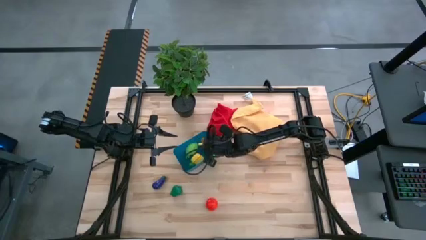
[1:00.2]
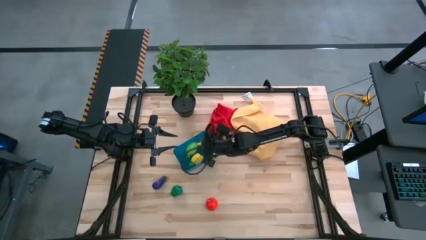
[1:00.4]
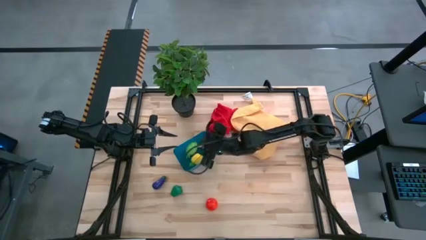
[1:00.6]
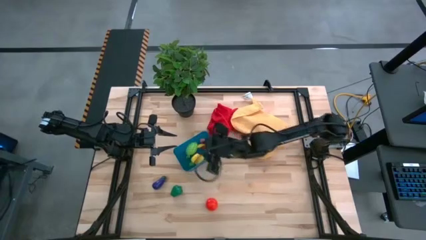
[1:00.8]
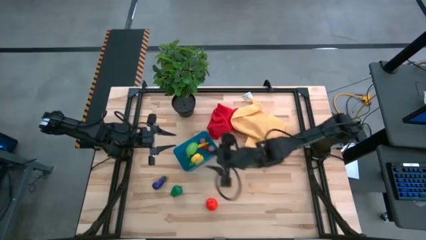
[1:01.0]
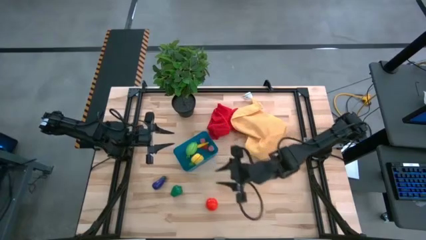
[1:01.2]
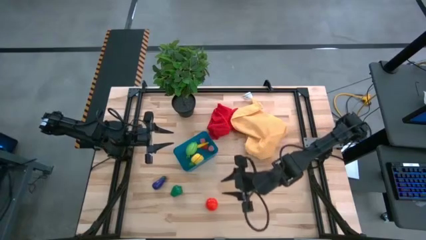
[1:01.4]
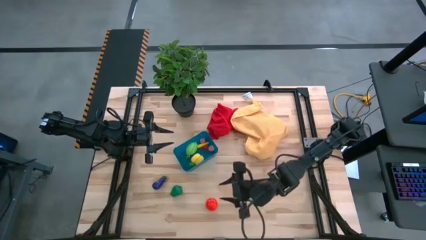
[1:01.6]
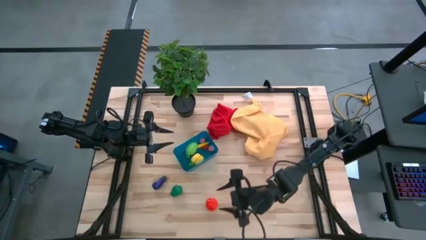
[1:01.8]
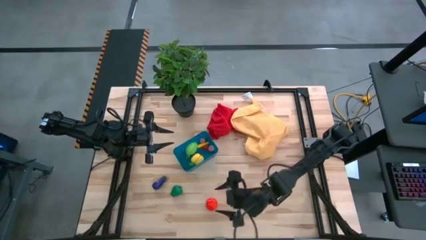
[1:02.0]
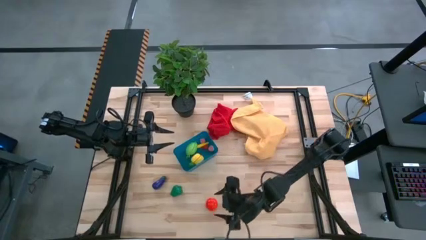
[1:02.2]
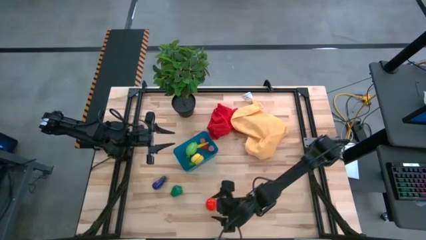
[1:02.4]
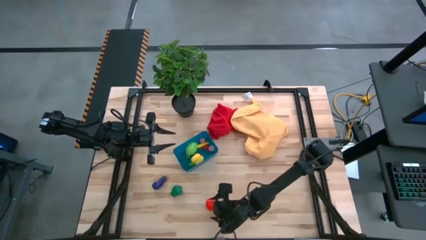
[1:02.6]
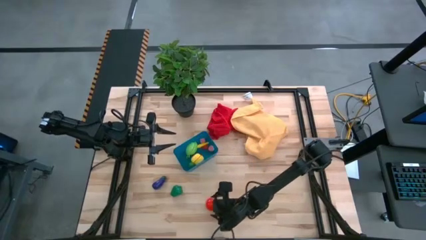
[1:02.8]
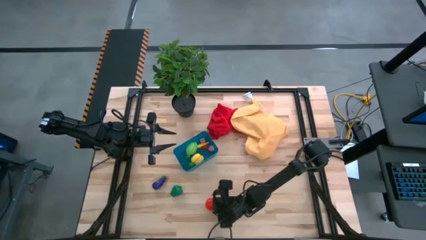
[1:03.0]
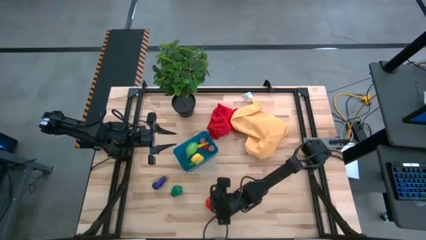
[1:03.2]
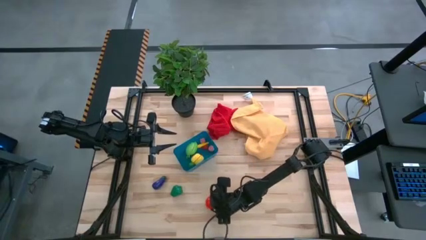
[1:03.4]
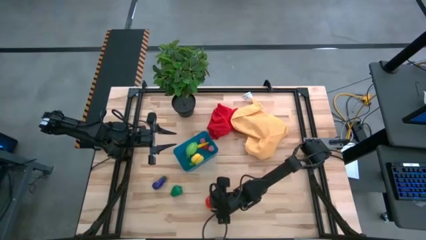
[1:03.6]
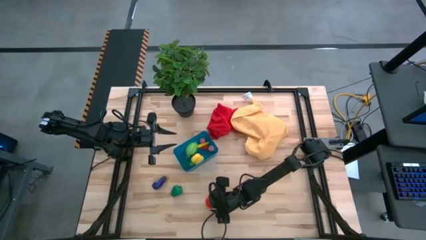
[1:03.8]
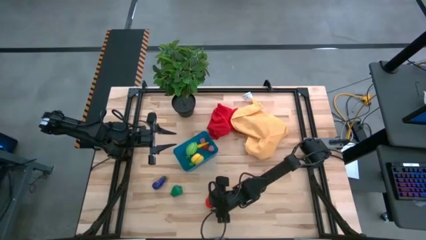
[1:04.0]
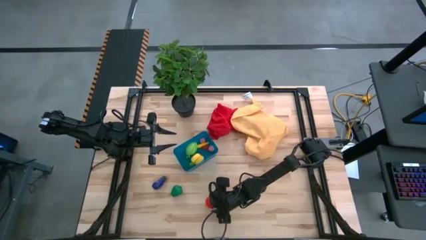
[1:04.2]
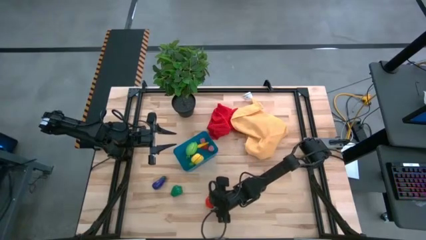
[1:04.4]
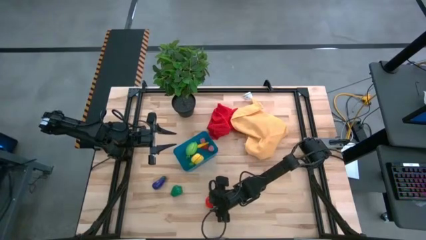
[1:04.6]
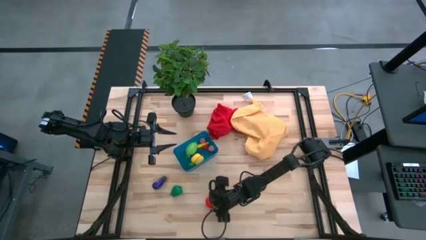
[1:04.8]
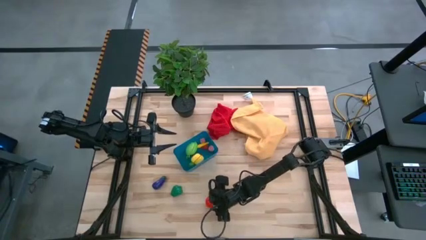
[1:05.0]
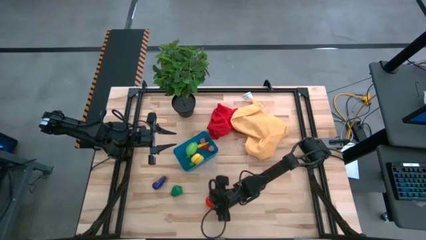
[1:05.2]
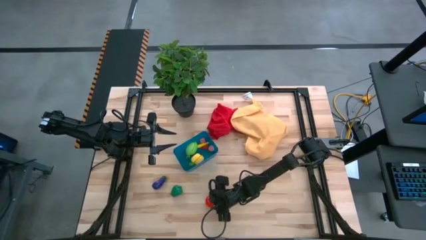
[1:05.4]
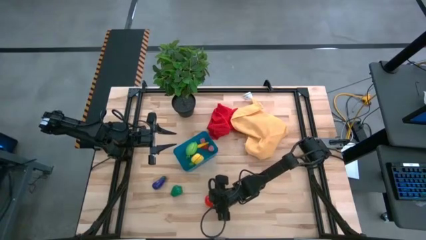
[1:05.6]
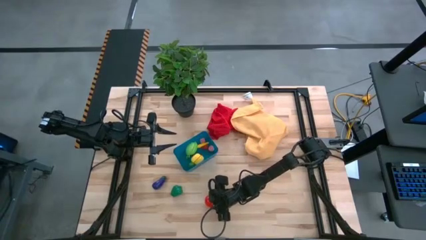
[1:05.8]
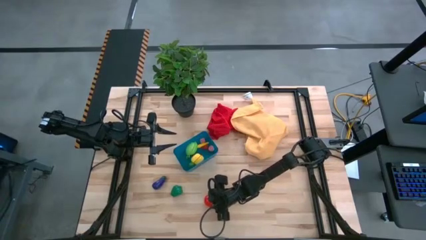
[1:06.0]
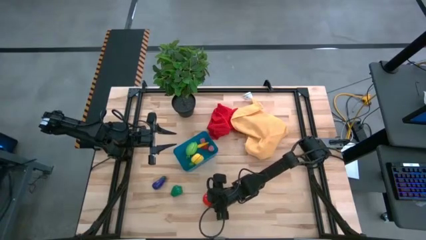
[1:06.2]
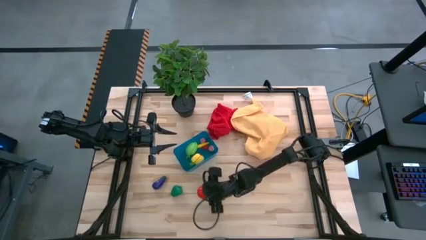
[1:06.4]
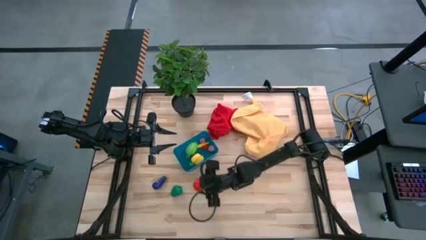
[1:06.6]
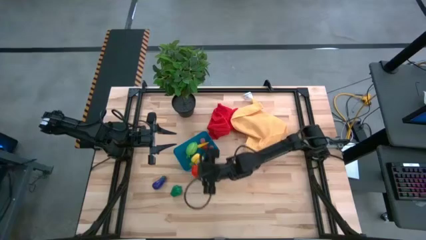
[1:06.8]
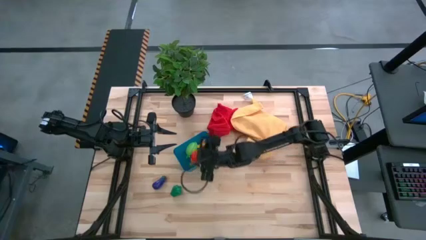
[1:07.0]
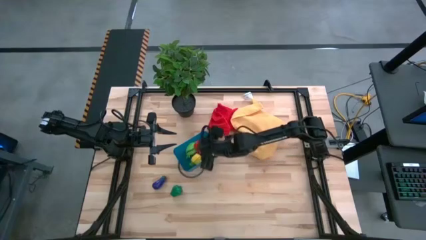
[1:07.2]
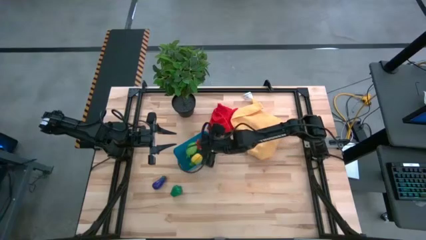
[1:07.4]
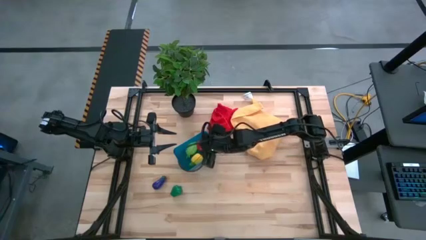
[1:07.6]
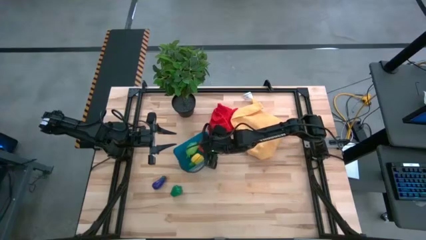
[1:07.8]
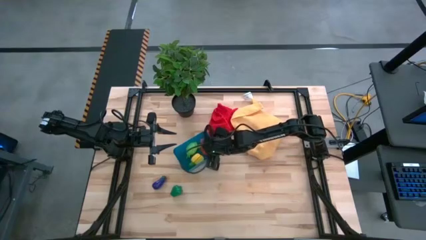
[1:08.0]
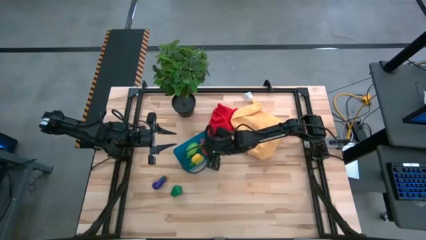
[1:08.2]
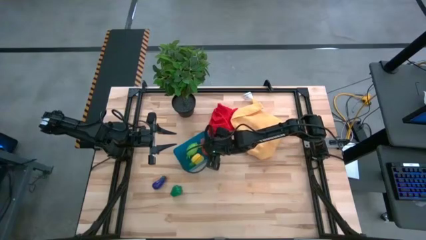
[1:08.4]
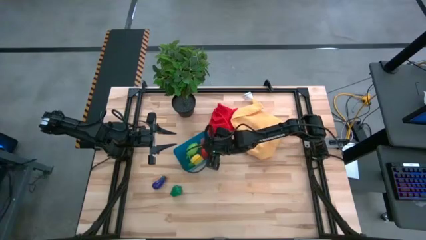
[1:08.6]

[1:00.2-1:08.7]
Task: Pick and placing Produce into tupperware
Put the red tomato into the blue bin

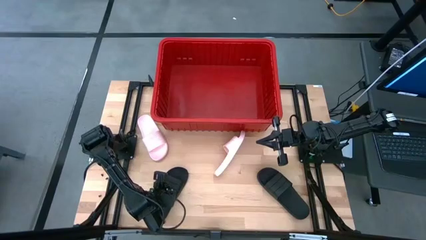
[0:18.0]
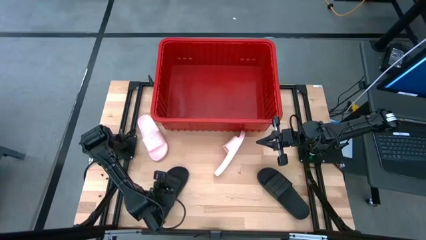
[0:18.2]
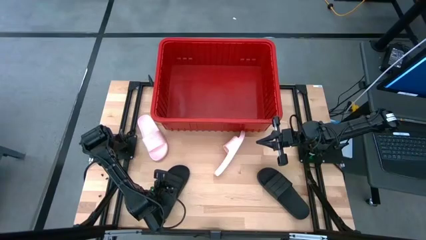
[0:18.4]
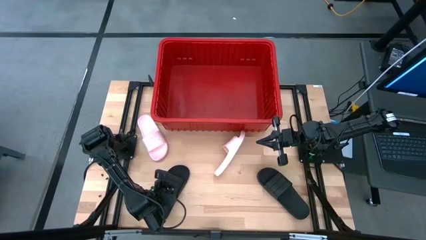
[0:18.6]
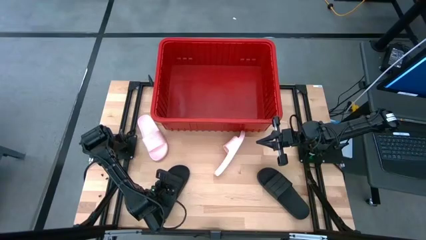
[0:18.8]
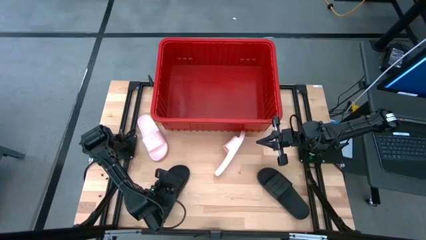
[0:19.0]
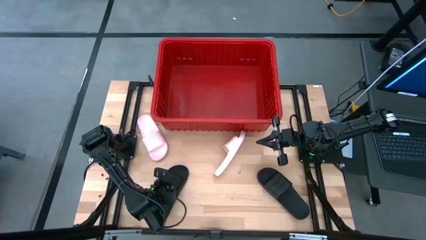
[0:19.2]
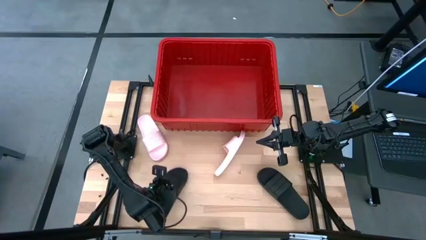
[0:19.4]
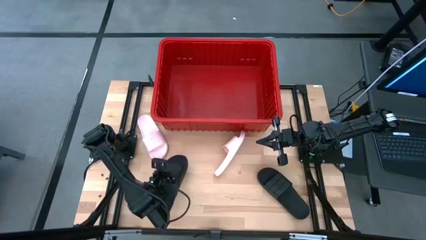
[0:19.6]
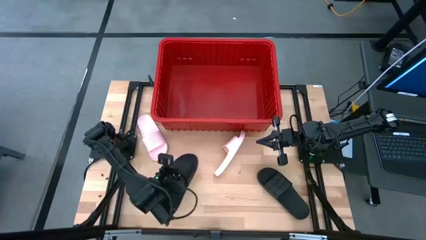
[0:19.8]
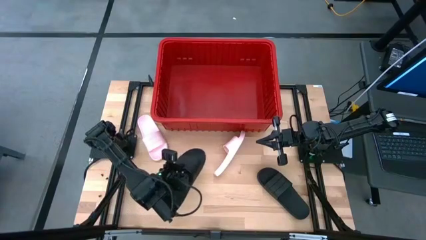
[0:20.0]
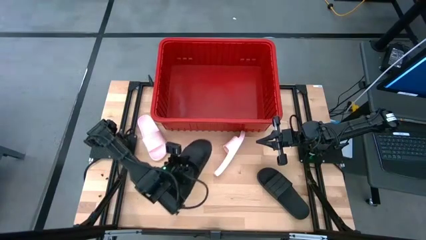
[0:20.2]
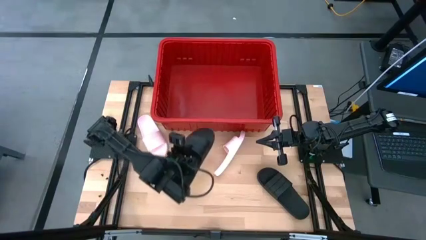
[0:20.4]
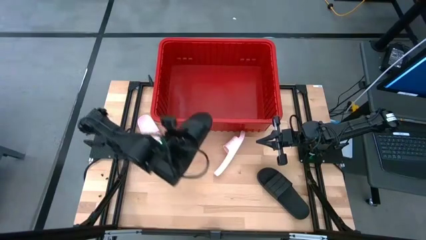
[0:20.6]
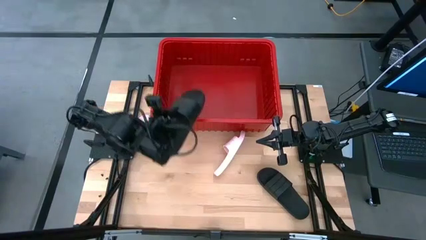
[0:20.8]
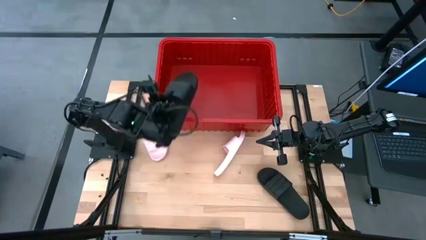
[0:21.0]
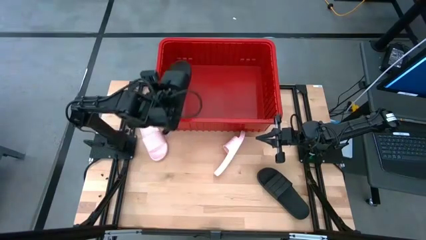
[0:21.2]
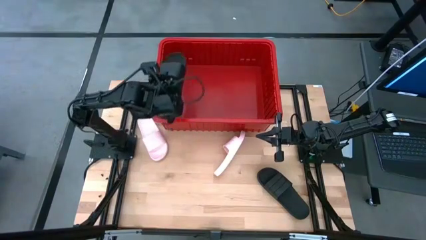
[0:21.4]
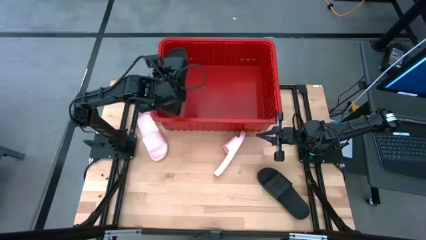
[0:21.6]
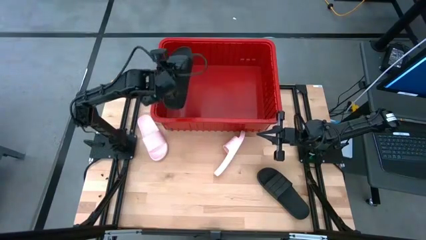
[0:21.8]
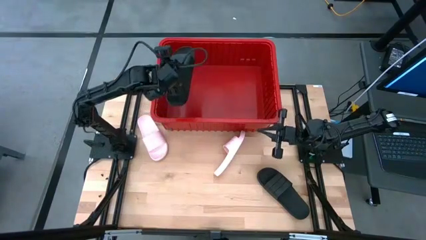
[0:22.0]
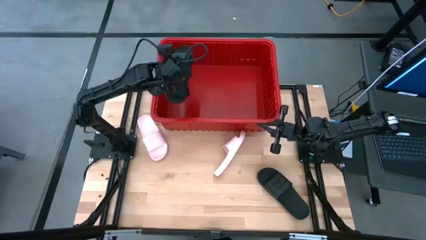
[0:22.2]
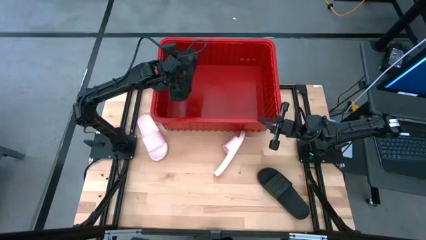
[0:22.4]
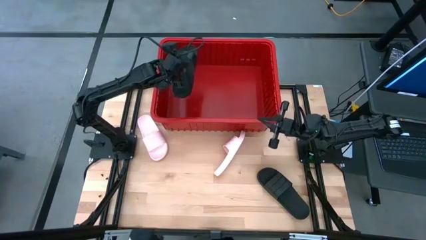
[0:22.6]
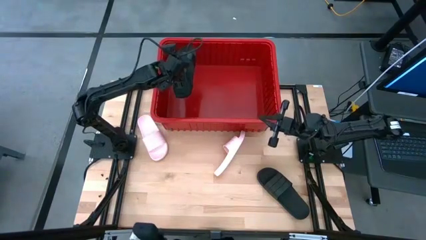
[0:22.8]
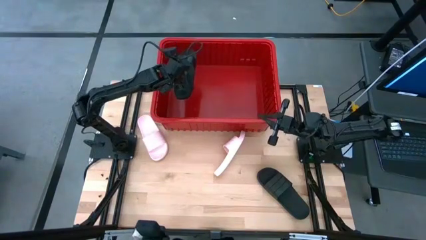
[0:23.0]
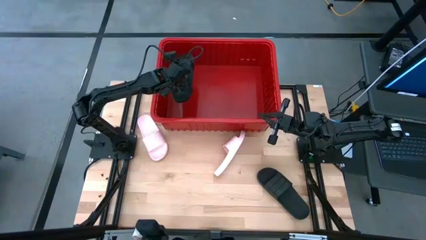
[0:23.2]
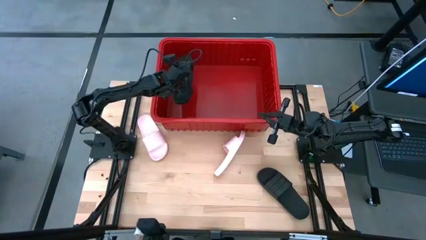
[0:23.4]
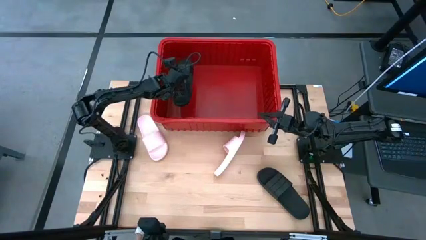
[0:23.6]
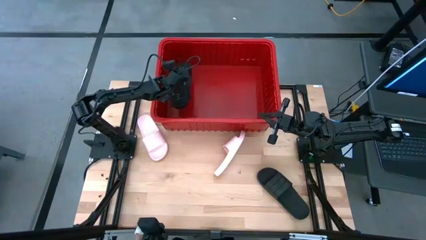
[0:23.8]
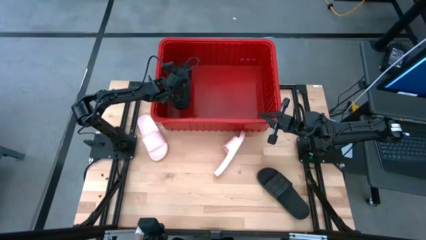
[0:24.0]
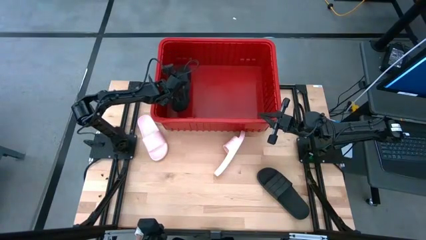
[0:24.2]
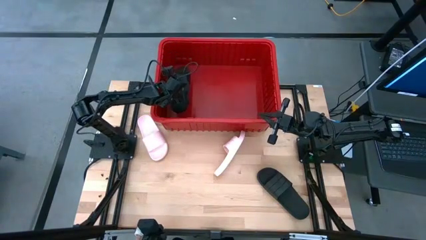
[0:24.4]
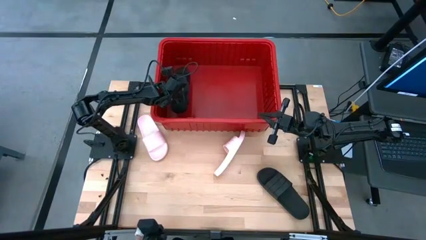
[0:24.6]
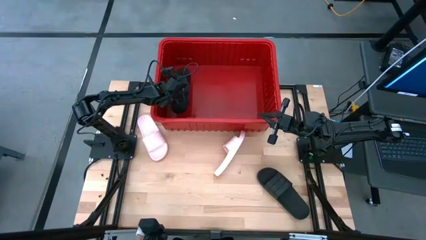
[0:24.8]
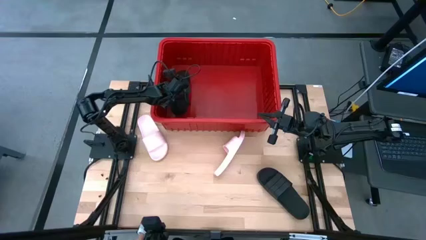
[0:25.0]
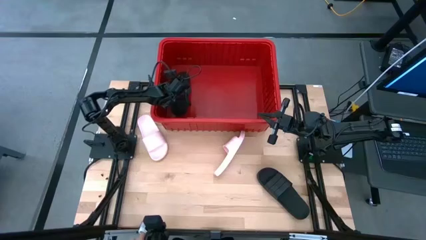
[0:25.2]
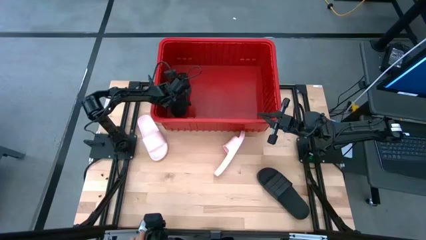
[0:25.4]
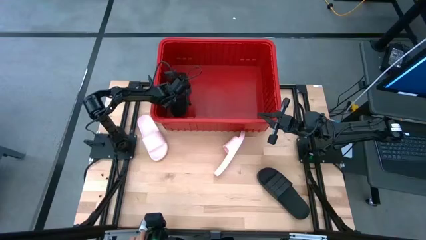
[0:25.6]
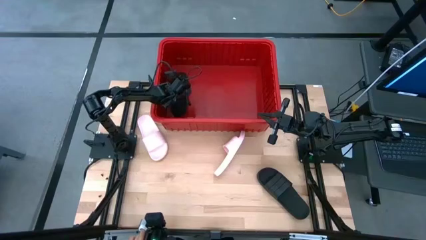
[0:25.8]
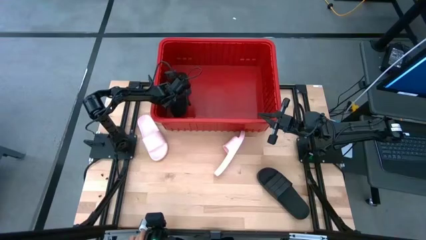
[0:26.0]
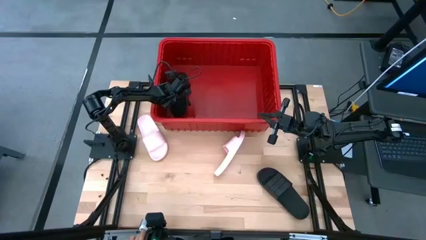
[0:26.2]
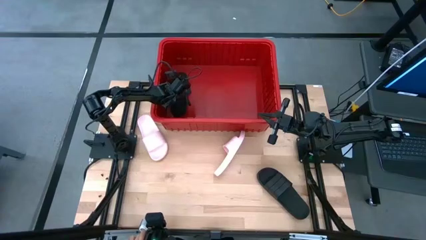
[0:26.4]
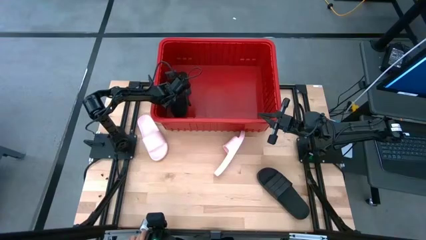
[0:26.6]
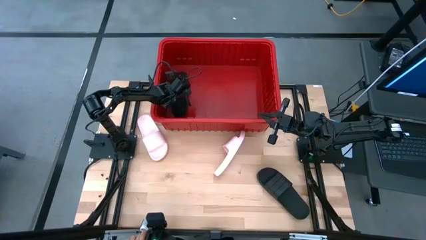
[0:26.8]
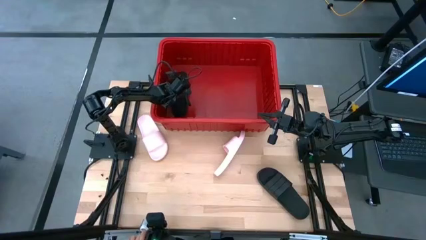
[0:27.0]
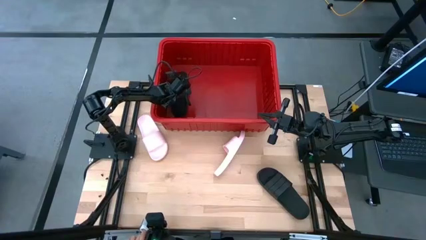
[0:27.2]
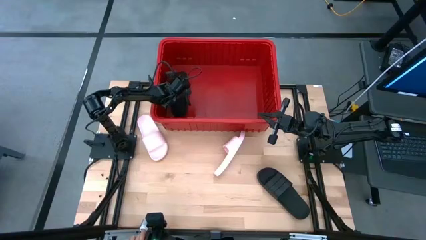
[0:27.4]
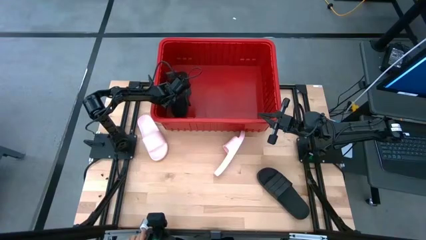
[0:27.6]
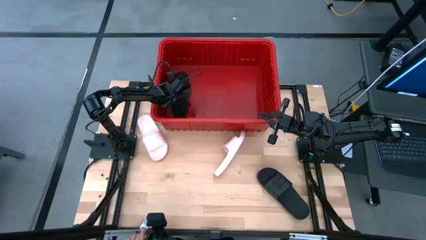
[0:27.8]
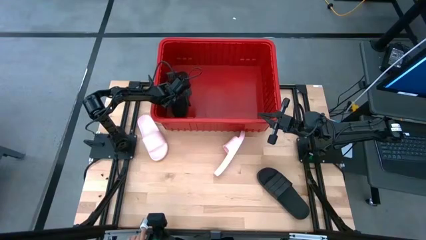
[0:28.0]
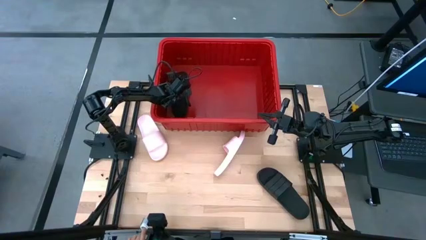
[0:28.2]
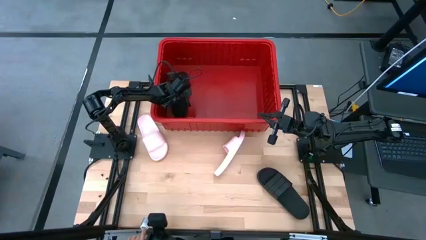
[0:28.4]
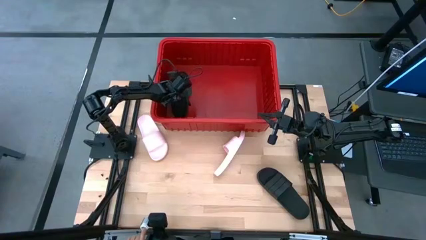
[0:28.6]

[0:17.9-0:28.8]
Task: Pick and place slides into bin
Put the left black slide into the red bin
